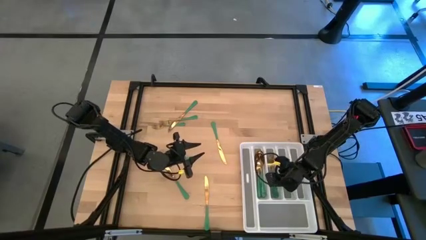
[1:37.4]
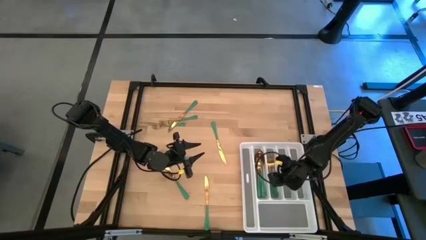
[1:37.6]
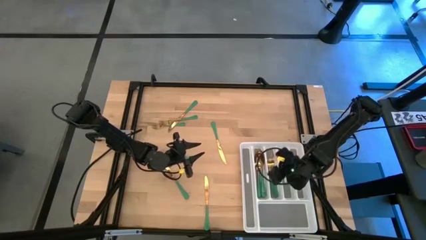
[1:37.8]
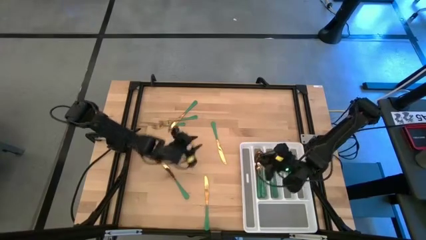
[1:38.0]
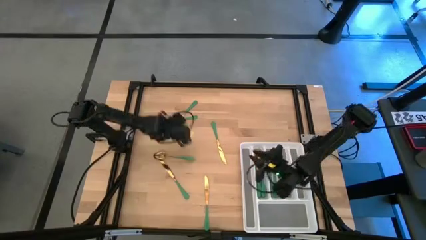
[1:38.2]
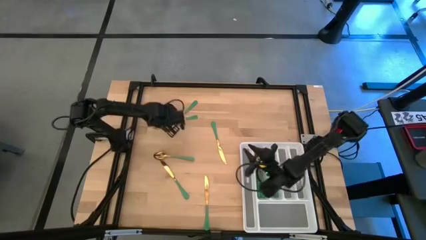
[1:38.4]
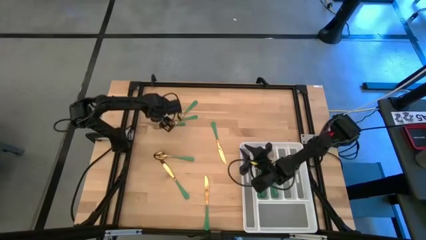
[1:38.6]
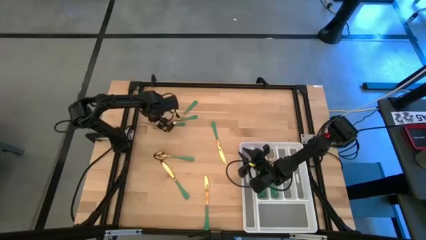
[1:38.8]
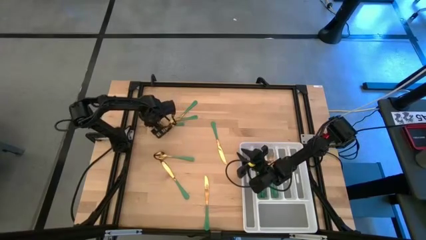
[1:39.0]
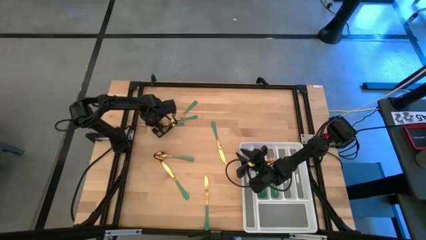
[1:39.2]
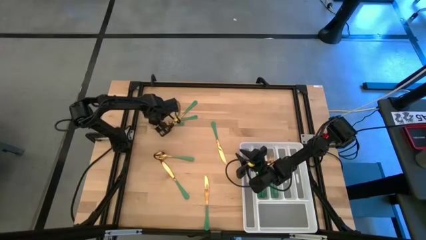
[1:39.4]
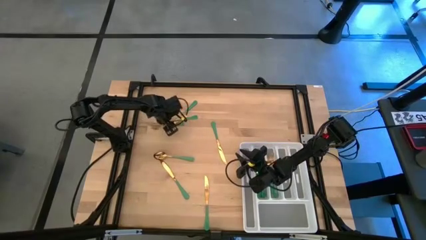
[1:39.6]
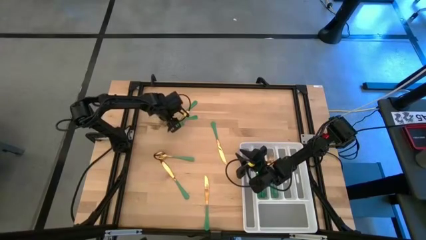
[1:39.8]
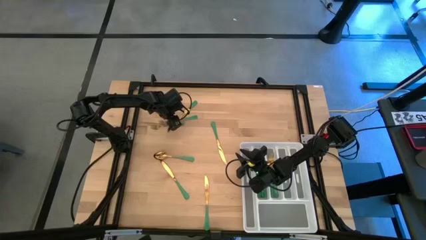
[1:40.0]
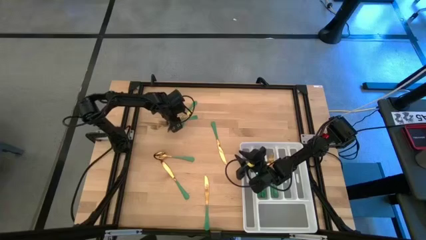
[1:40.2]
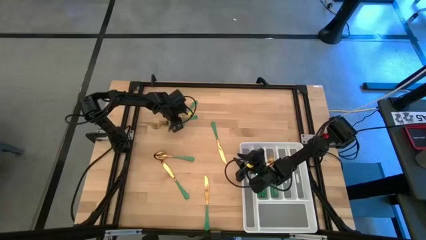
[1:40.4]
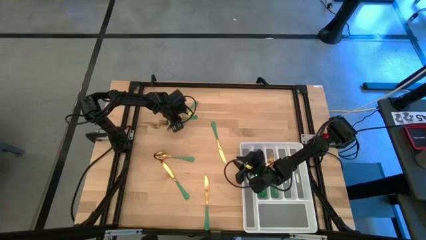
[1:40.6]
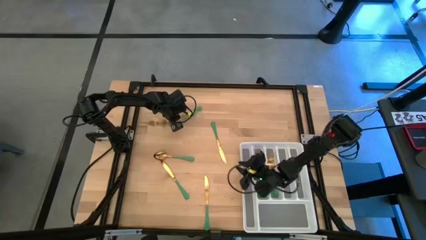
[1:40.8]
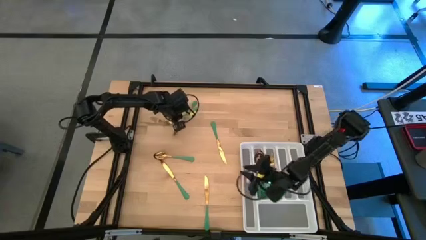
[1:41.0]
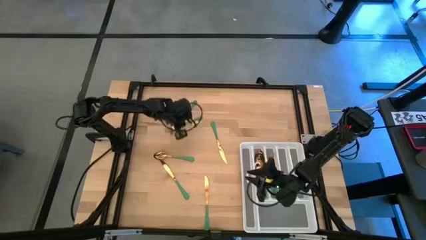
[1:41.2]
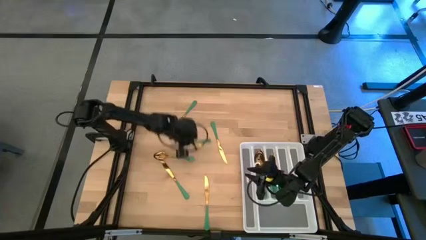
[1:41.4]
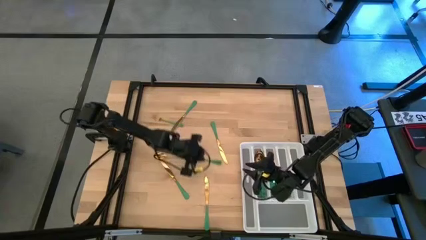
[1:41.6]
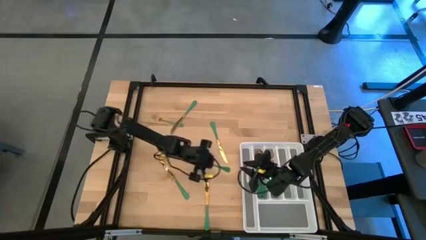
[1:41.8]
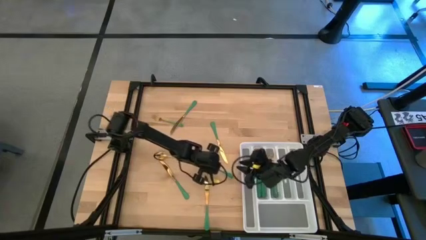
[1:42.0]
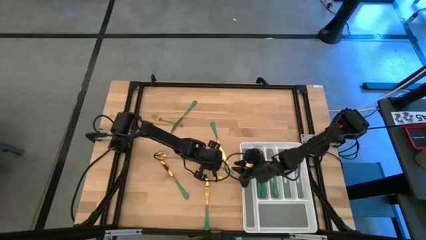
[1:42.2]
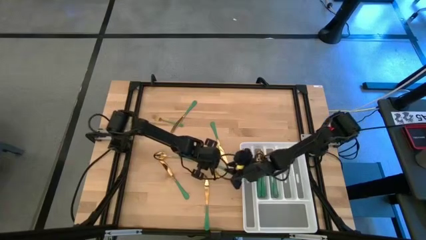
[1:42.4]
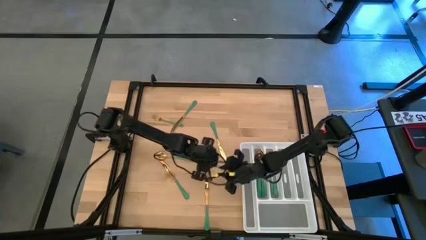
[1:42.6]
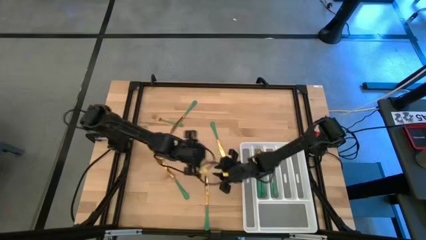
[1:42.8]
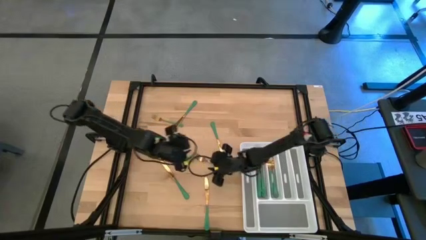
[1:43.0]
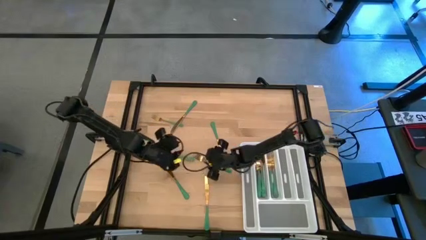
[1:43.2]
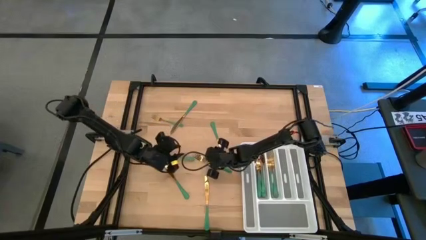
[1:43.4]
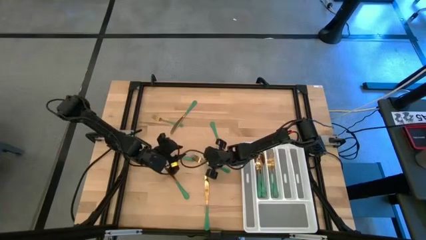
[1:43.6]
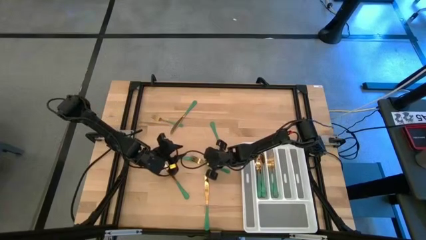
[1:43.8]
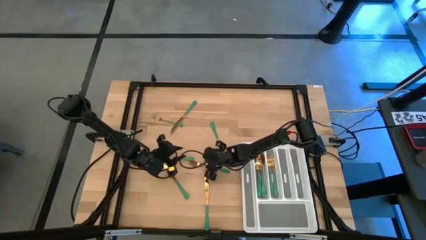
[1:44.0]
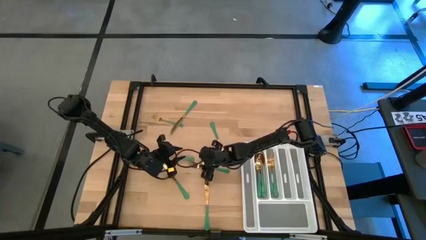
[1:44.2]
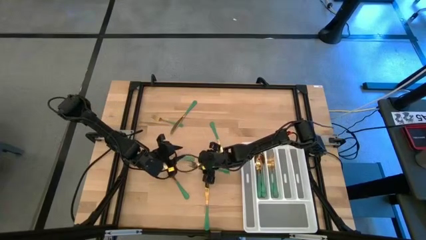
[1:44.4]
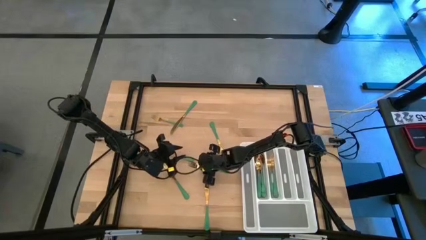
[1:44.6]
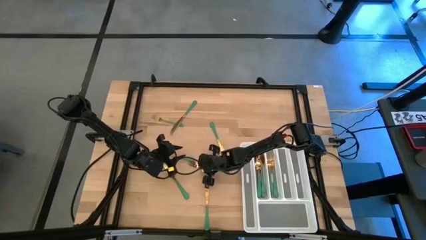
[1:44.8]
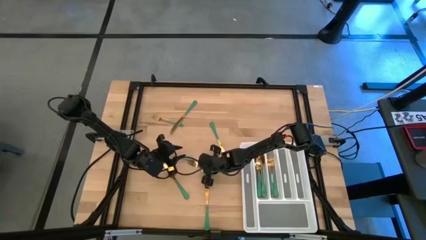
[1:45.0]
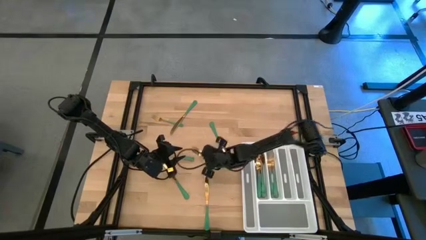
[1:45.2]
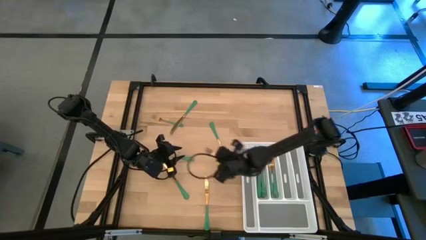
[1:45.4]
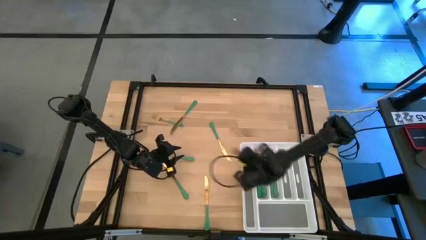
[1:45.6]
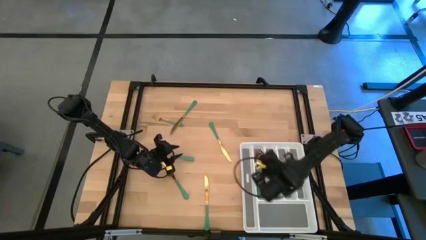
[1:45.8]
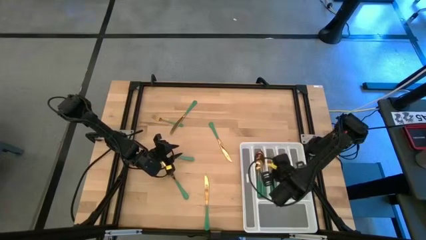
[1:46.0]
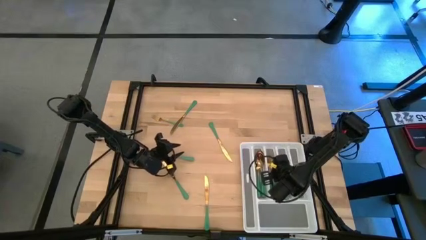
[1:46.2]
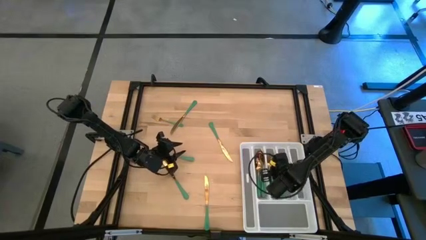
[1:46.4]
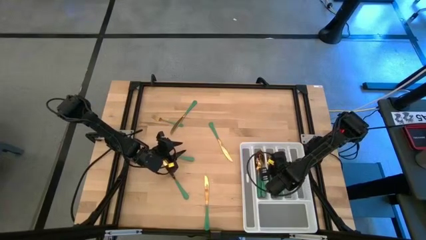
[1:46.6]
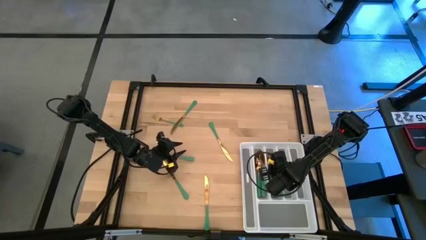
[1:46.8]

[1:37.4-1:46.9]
Task: Sort silverware
Put the top center green fork into the silverware rack

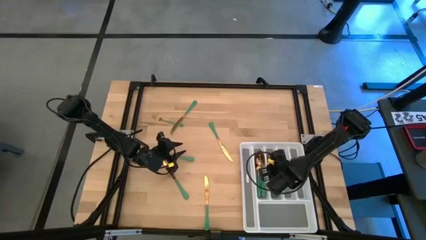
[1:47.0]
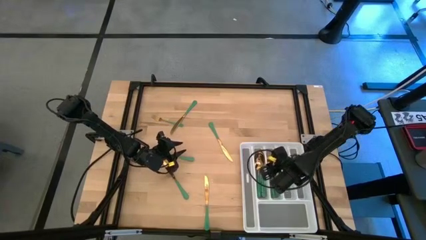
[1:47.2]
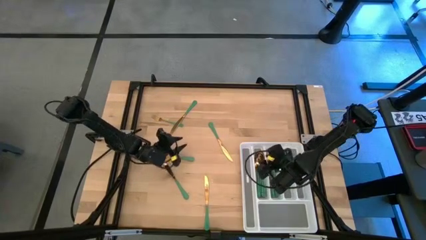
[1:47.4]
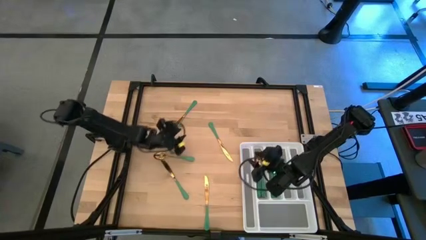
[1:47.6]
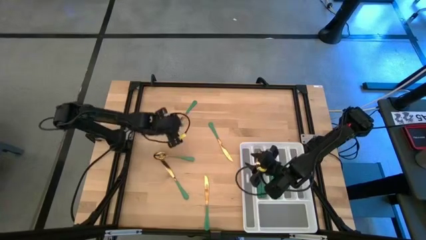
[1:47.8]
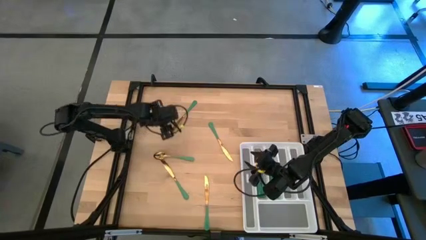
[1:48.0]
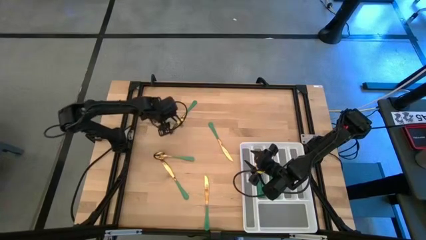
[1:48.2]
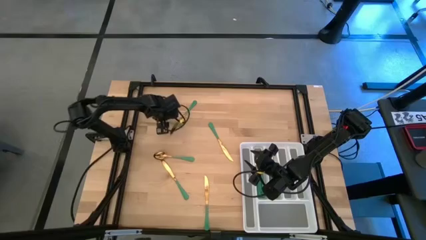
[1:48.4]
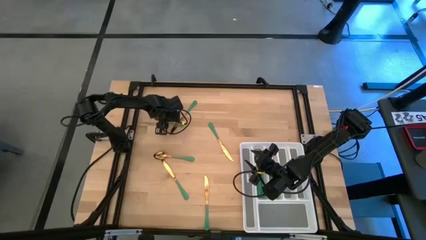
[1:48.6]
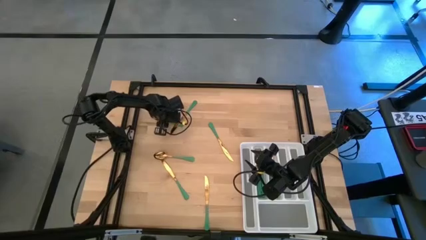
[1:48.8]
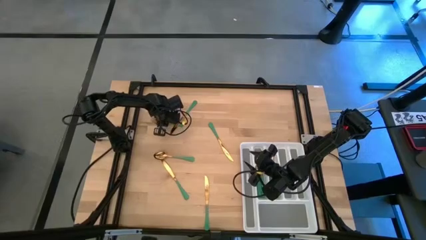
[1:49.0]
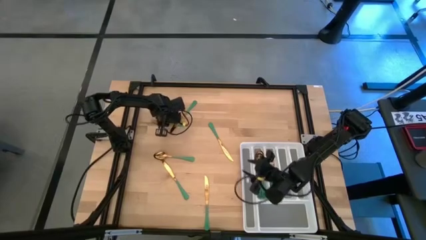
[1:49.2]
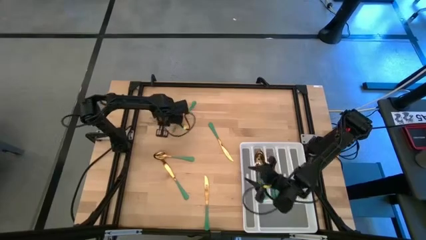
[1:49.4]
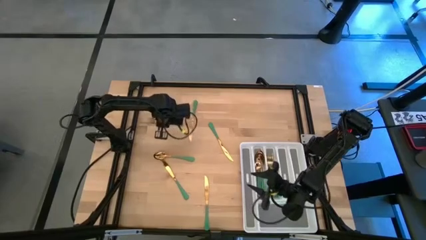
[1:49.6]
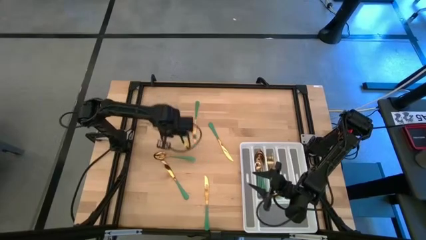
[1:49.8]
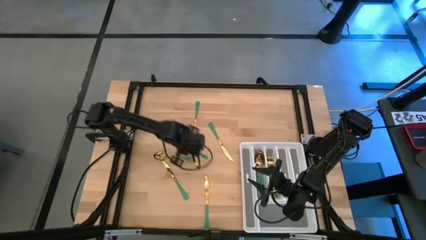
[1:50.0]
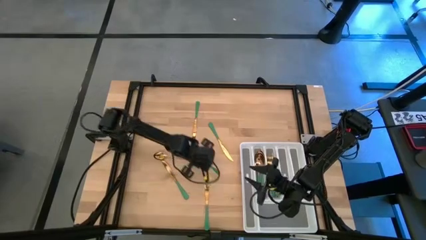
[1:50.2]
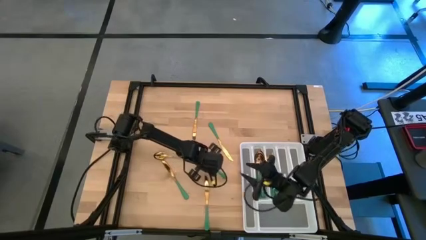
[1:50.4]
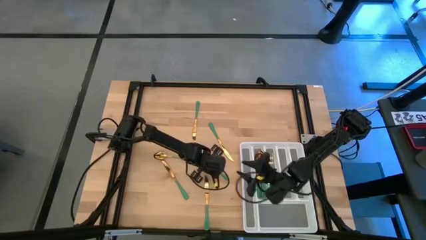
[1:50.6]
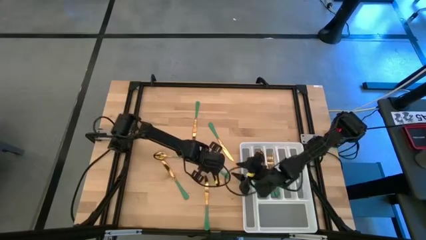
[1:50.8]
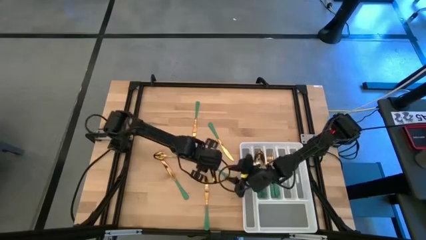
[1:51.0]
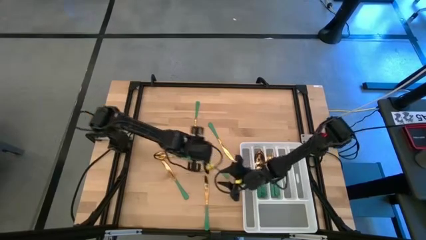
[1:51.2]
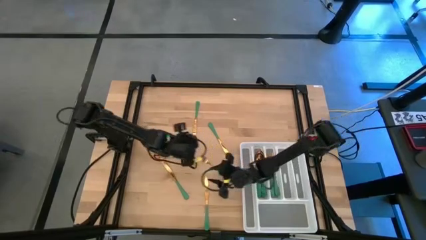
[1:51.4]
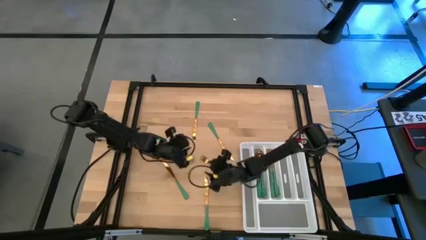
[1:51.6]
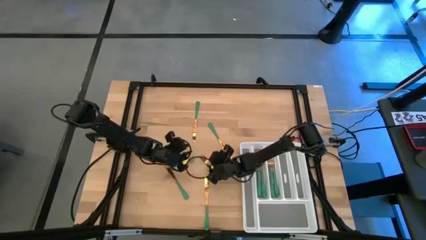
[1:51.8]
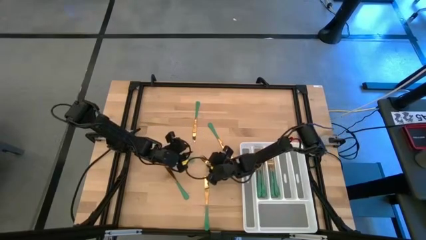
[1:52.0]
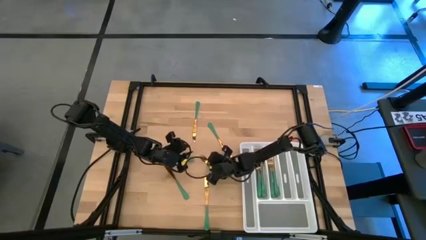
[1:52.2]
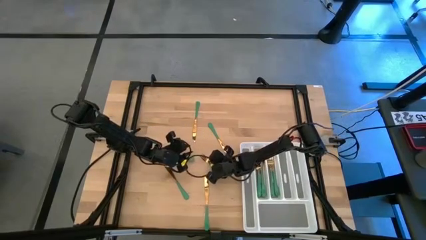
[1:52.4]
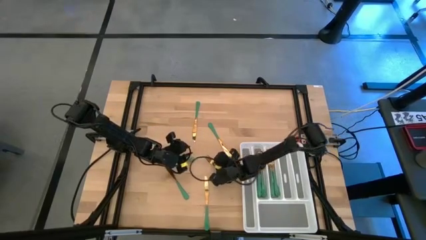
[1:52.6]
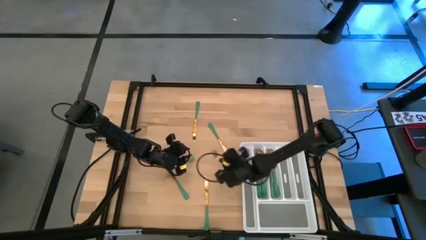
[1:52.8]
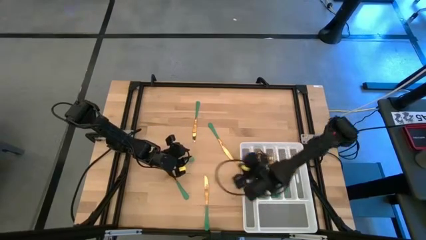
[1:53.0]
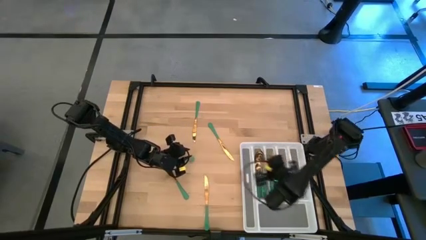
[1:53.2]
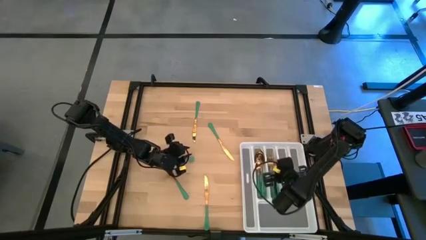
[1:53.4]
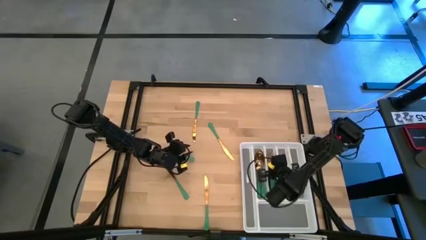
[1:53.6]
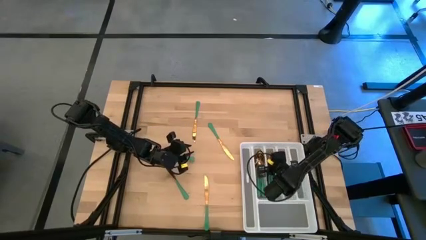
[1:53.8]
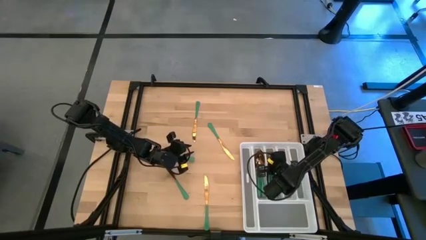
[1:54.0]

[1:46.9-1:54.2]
Put the green fork into the silverware rack
